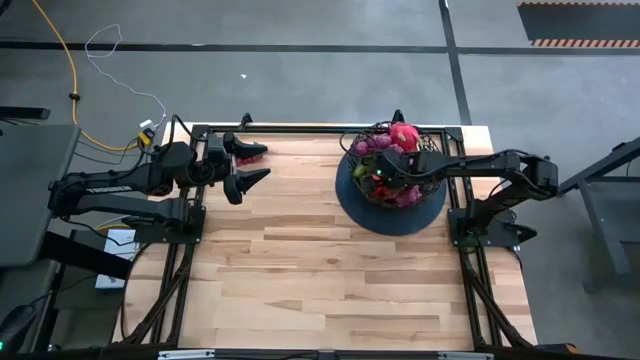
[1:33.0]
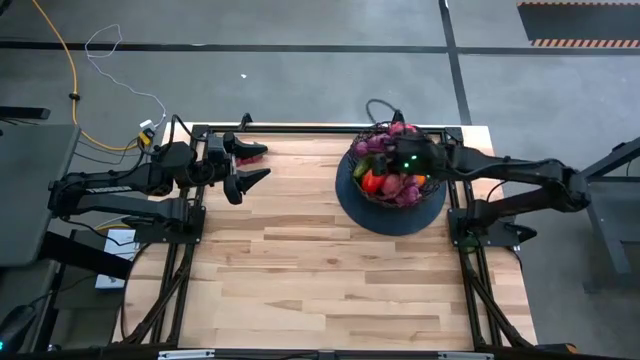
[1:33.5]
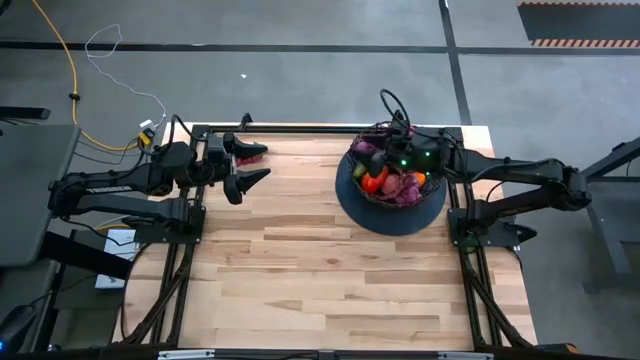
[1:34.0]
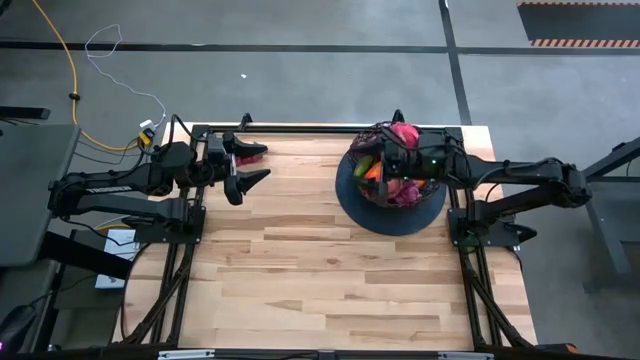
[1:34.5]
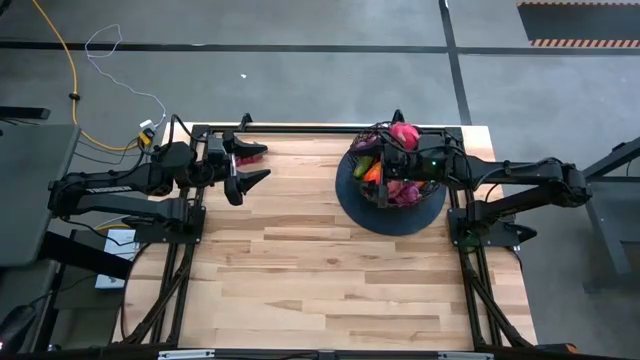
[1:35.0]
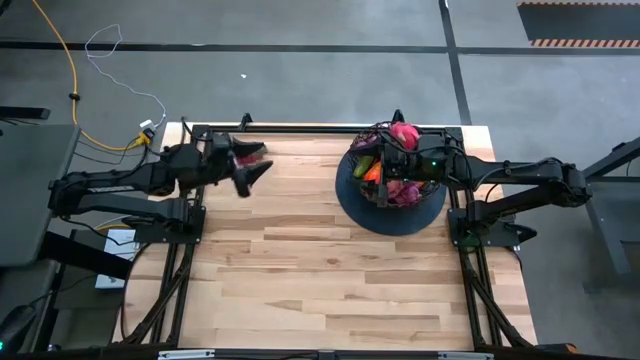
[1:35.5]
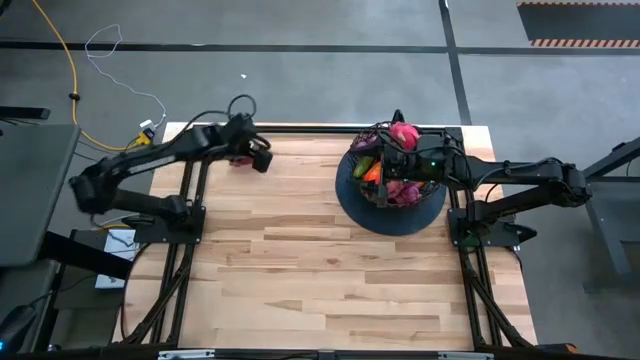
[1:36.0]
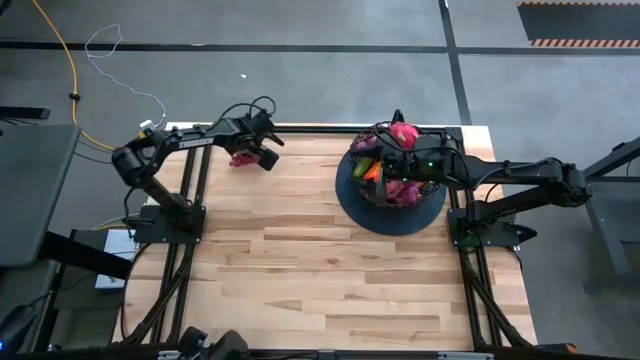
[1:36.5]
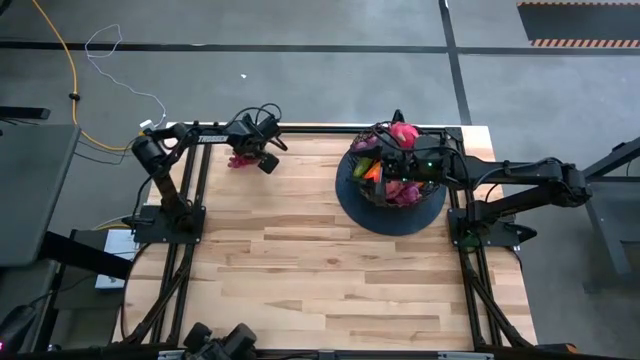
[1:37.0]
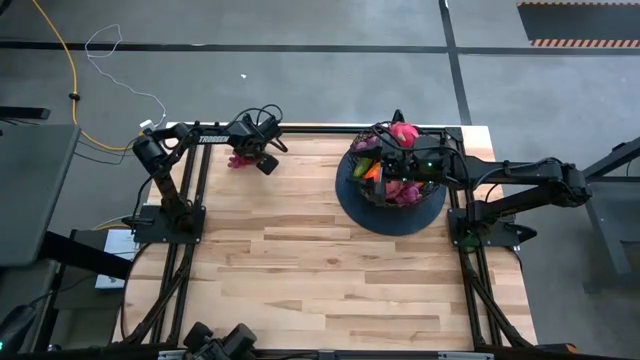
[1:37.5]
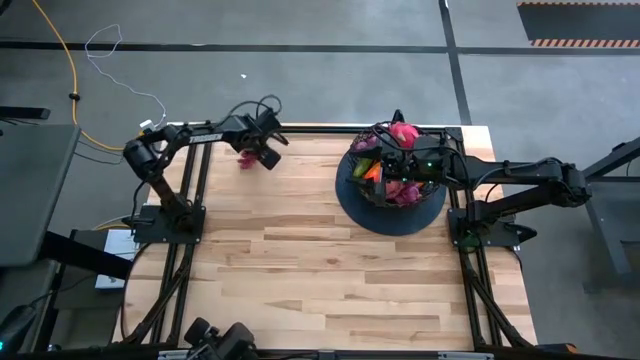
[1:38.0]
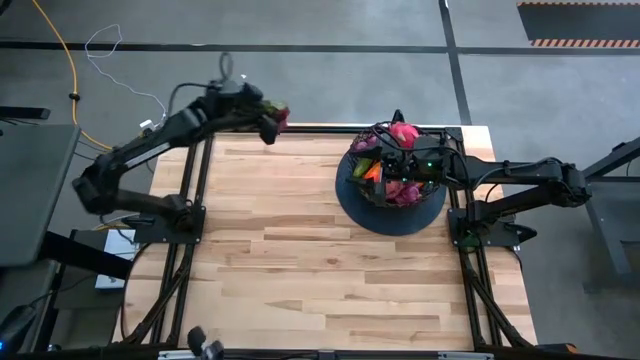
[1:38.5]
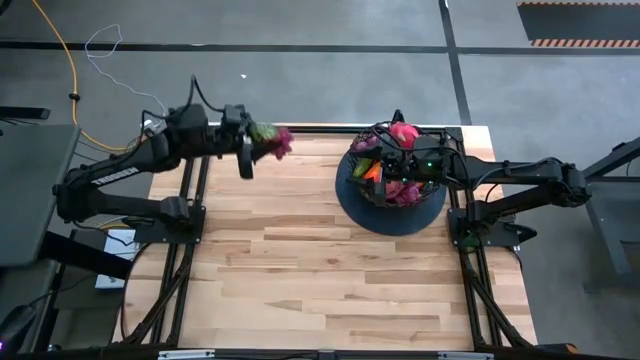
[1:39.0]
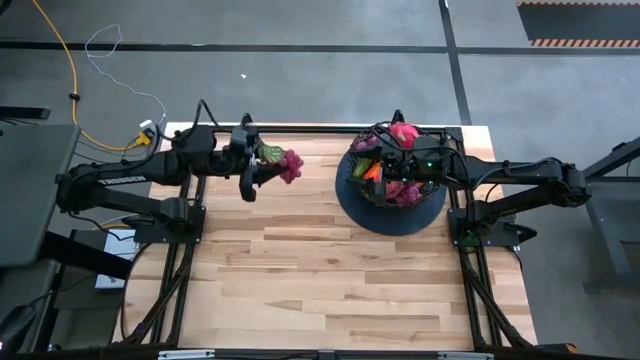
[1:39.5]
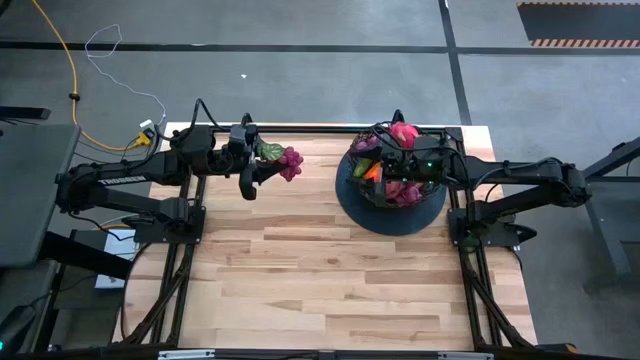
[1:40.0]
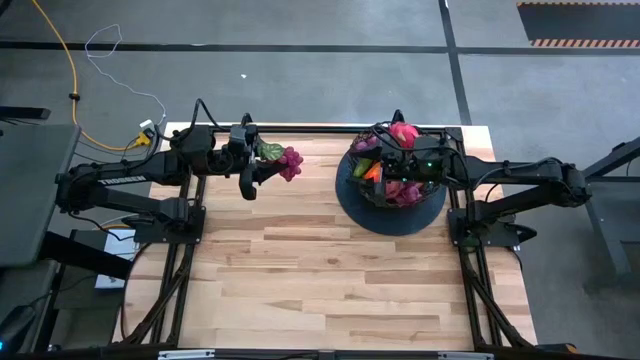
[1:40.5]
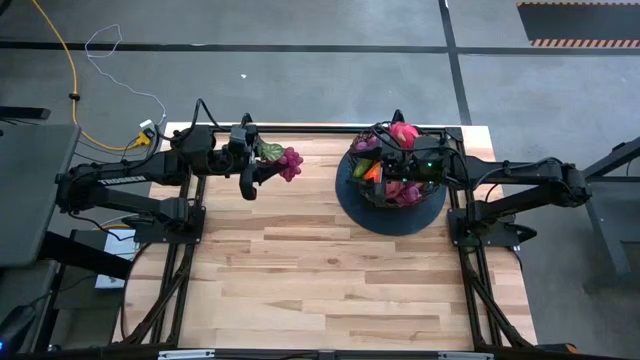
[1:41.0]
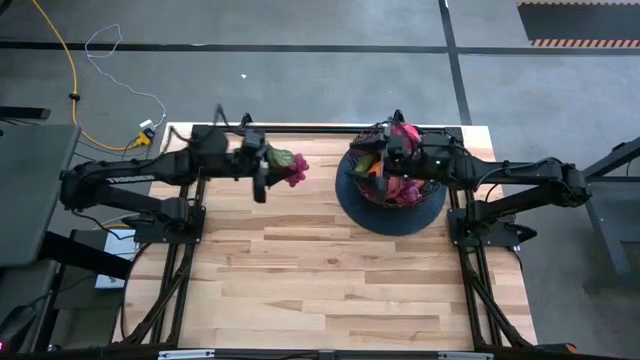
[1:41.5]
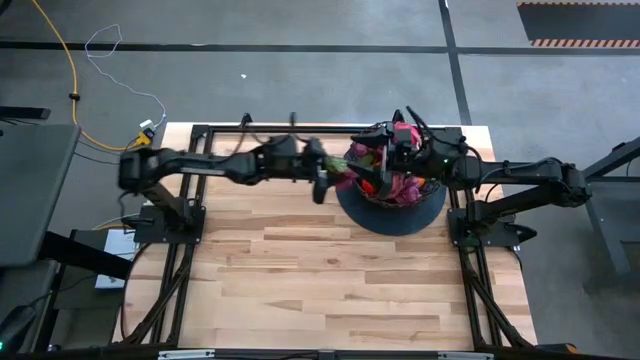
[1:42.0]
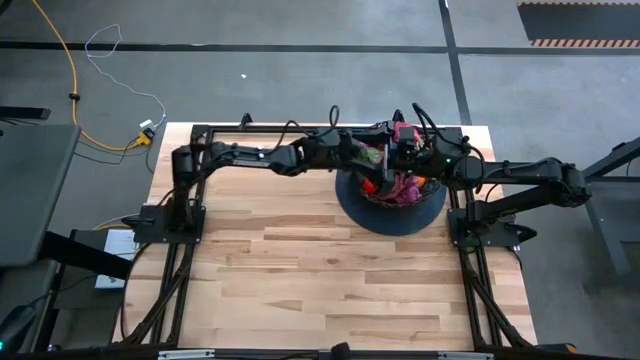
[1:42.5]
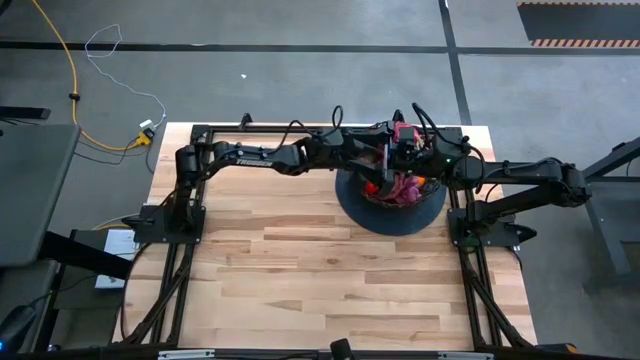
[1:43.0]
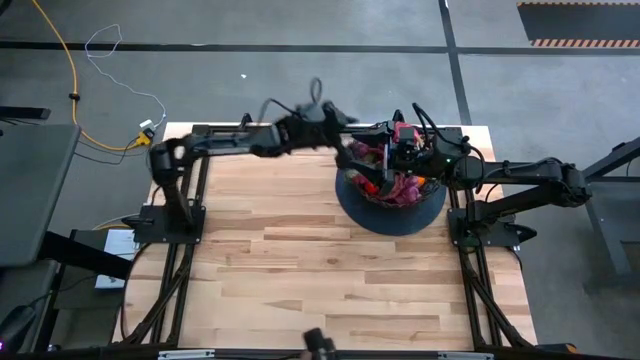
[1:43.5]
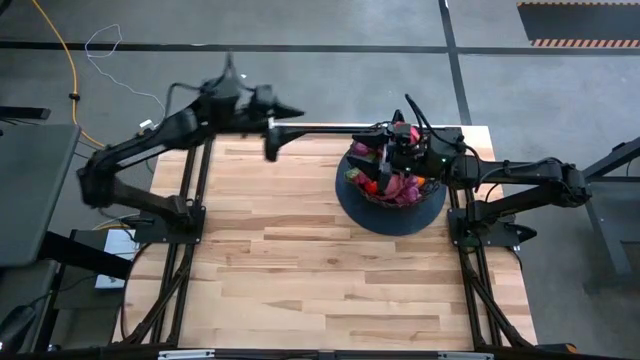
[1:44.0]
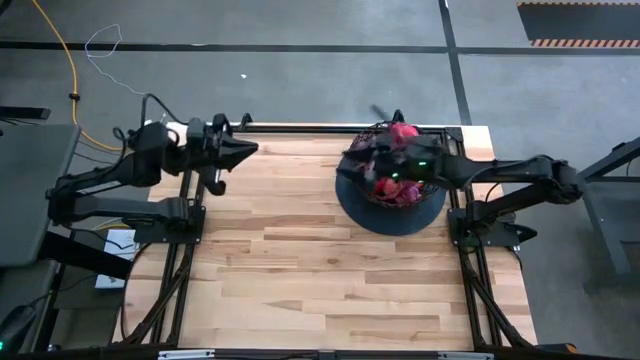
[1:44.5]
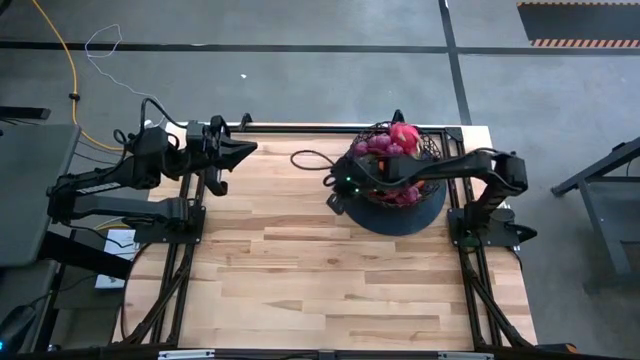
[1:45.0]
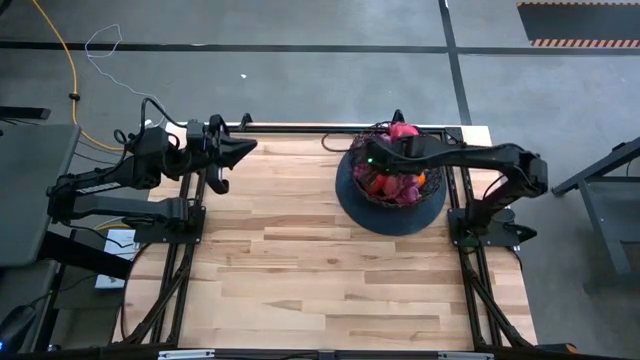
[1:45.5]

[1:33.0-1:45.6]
Task: Build produce basket
Put the grapes into the wire basket

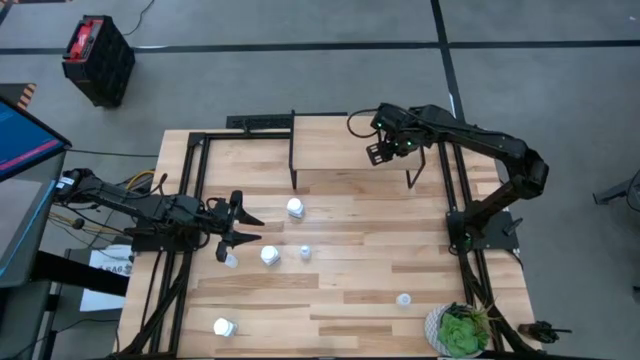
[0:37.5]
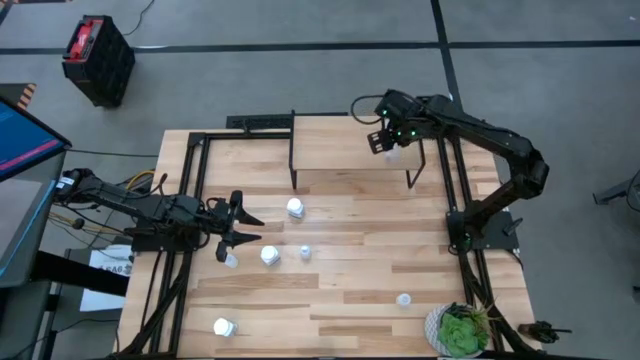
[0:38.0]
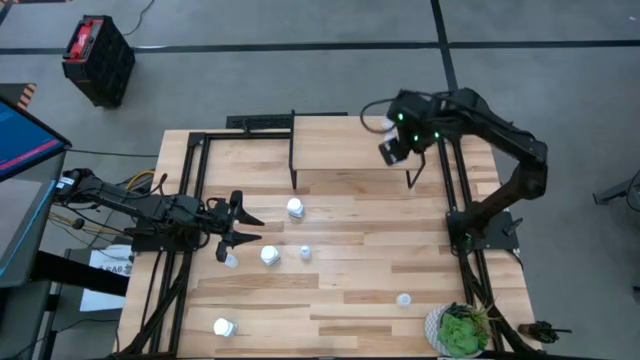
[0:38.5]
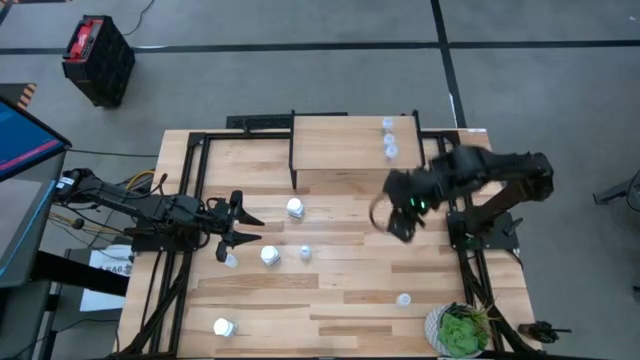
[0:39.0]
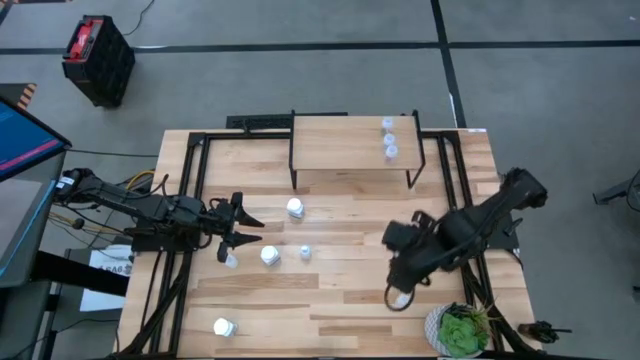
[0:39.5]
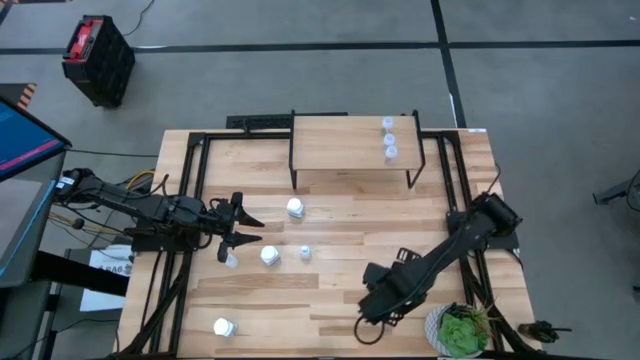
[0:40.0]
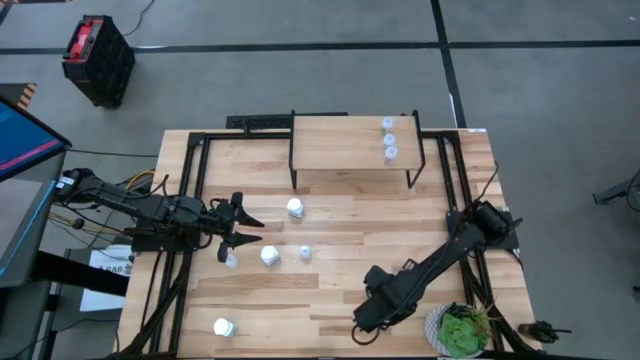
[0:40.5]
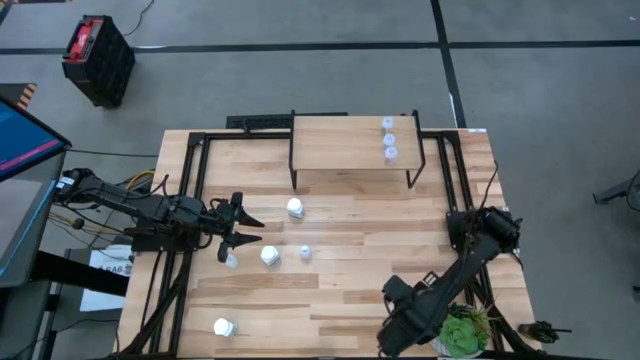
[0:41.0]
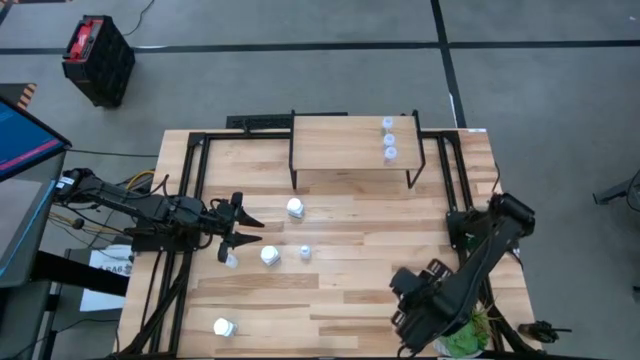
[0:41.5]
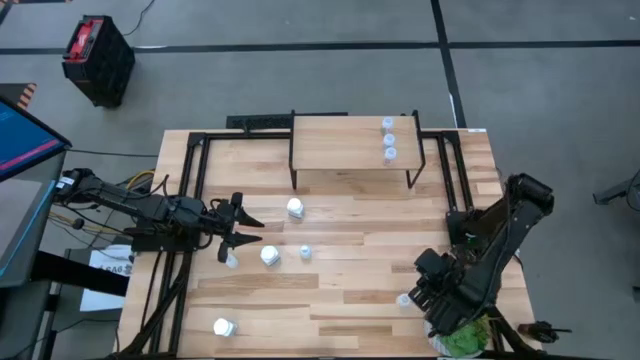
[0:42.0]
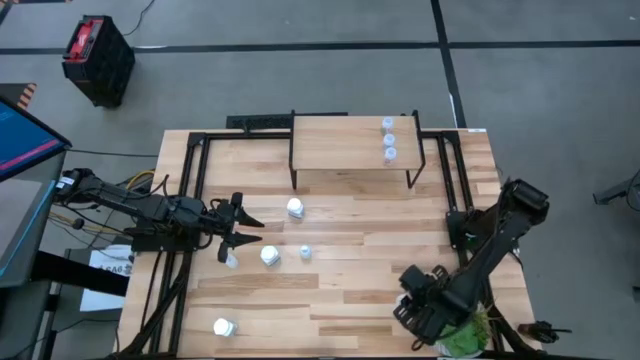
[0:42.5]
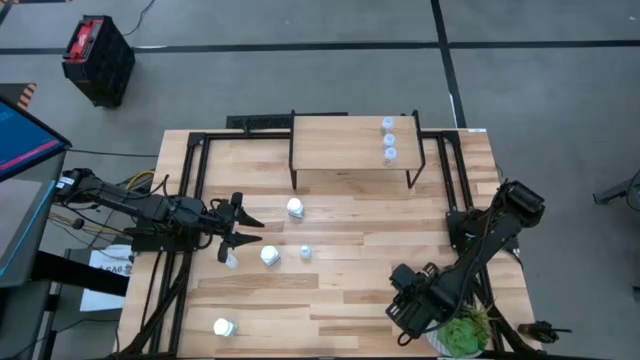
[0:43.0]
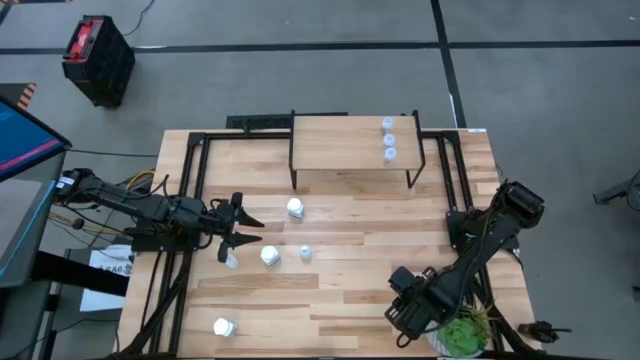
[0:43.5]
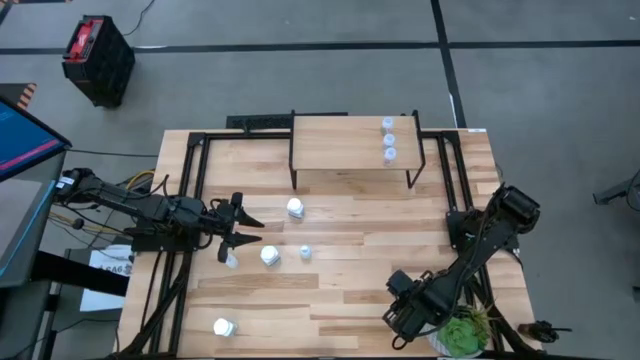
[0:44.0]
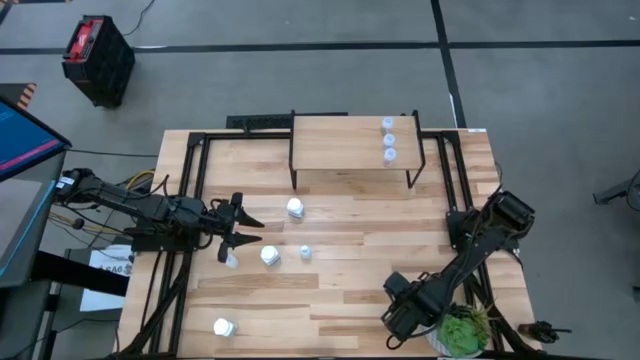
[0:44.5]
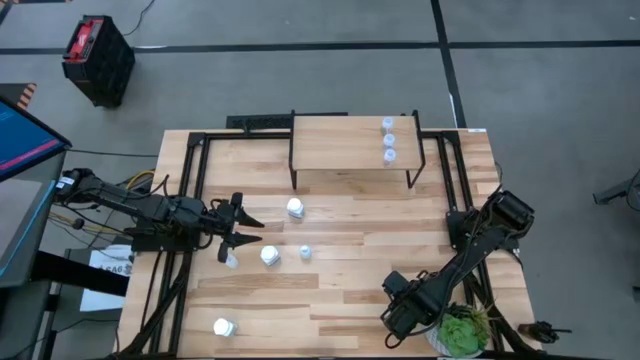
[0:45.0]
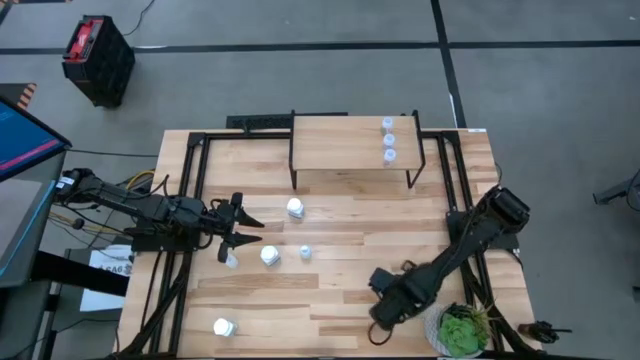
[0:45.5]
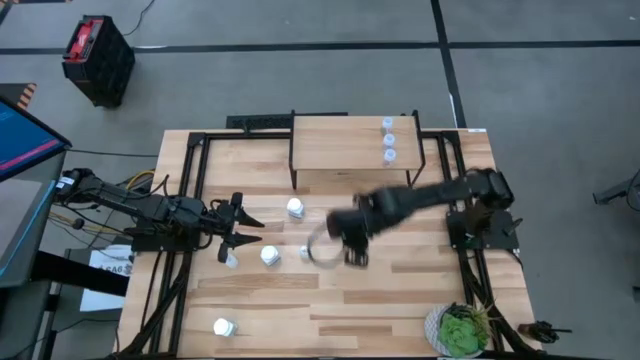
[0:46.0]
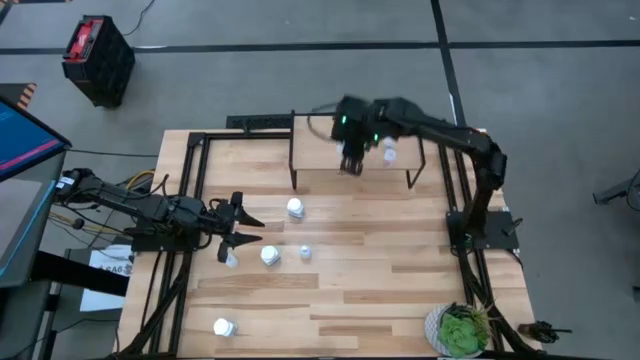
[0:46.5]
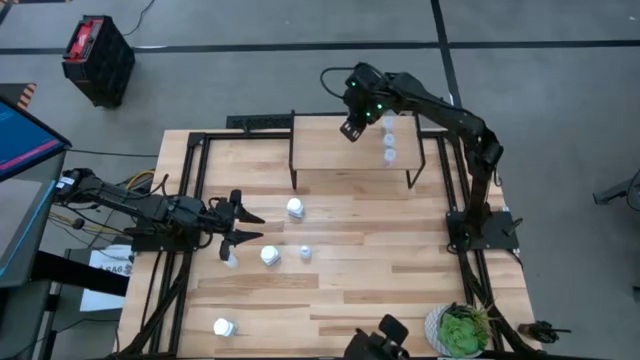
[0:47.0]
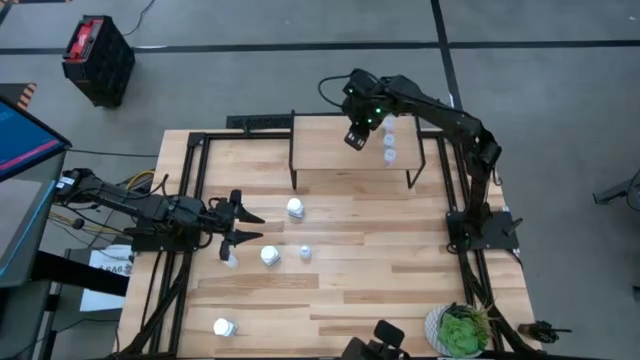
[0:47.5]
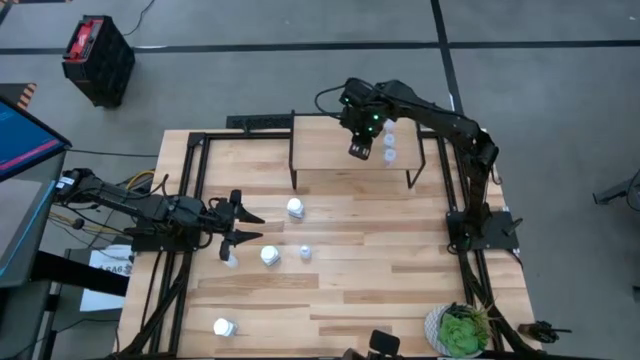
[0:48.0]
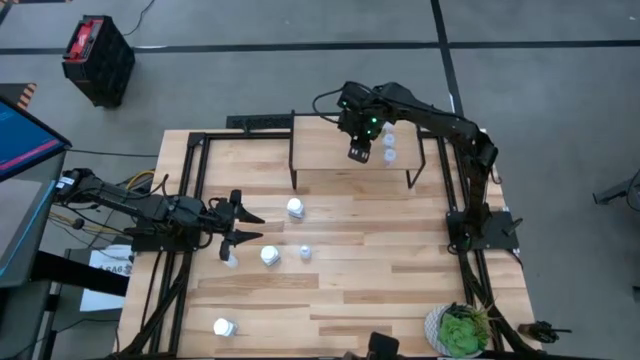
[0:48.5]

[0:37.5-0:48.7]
Task: Pick and place medicine bottles onto shelf by color
Put the bottom translucent medicine bottle onto the middle of the shelf
